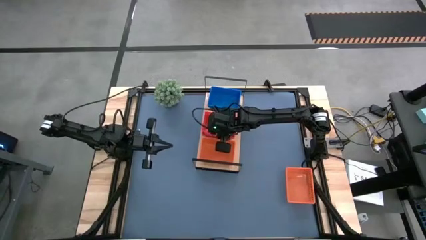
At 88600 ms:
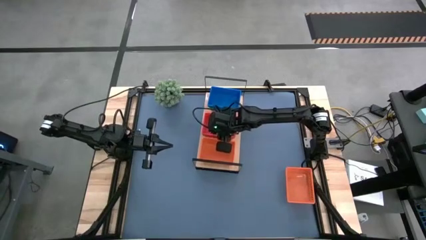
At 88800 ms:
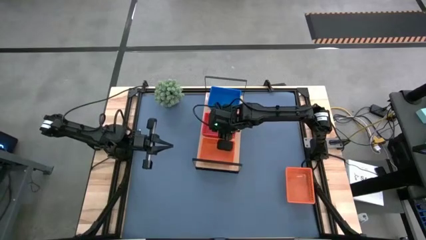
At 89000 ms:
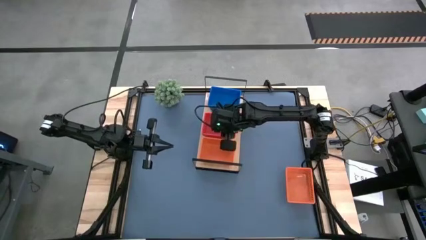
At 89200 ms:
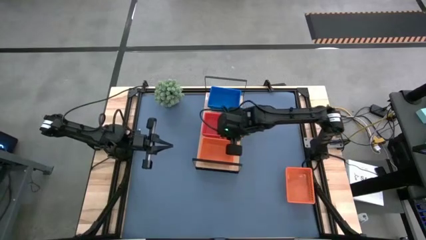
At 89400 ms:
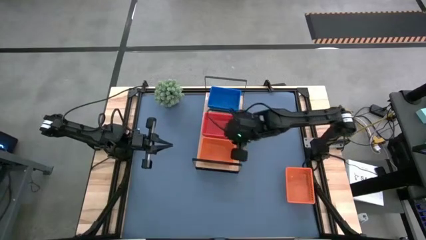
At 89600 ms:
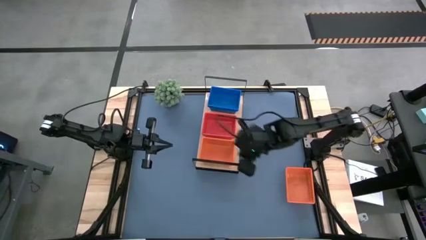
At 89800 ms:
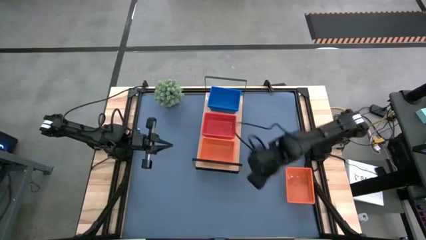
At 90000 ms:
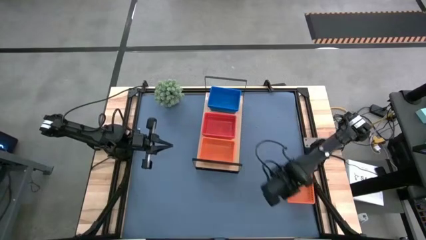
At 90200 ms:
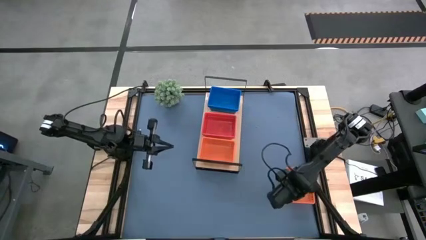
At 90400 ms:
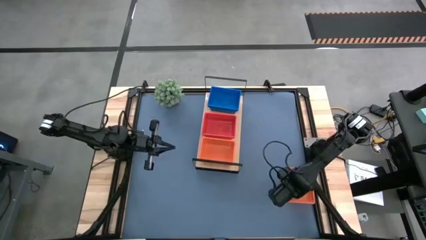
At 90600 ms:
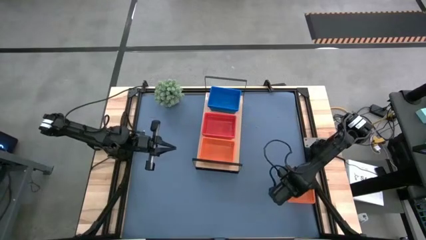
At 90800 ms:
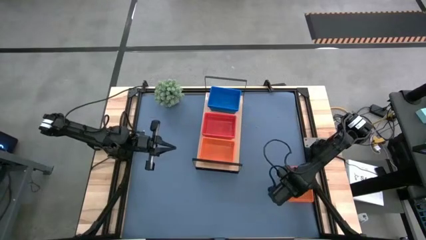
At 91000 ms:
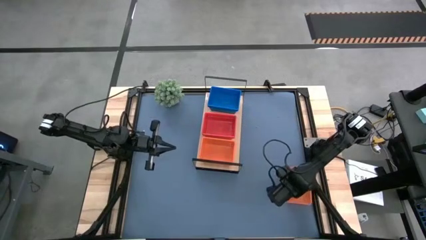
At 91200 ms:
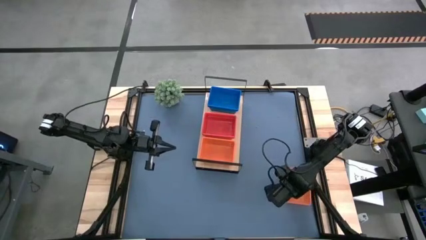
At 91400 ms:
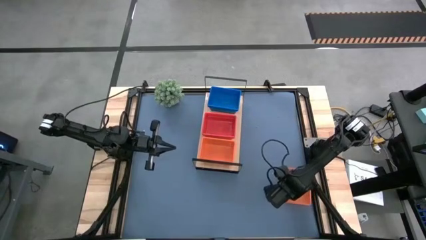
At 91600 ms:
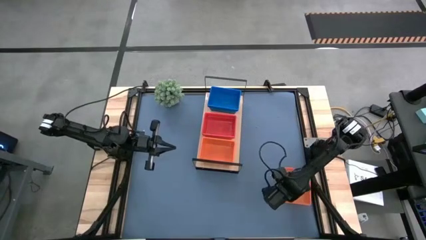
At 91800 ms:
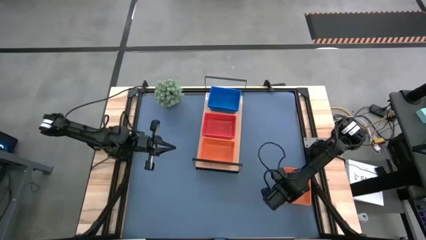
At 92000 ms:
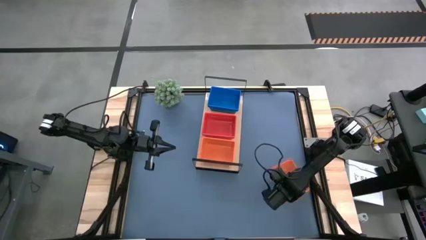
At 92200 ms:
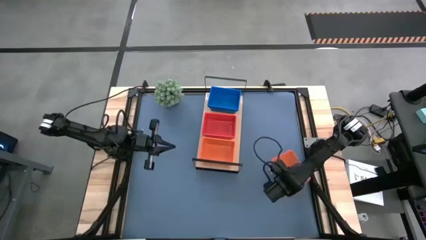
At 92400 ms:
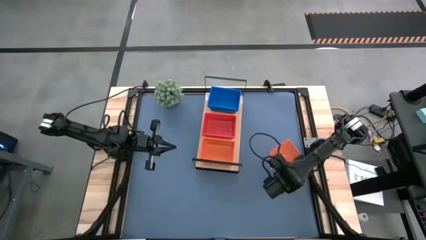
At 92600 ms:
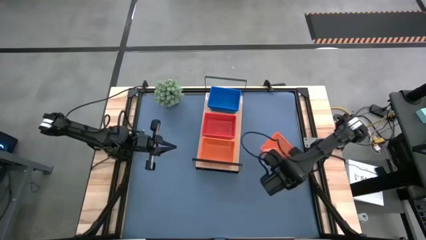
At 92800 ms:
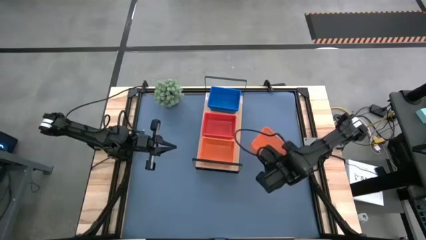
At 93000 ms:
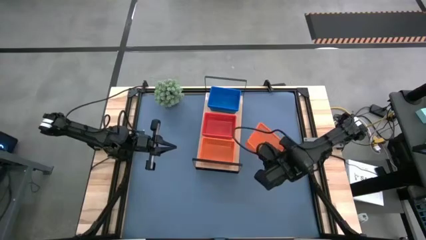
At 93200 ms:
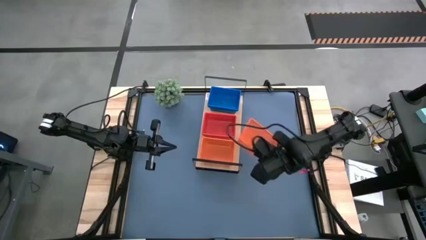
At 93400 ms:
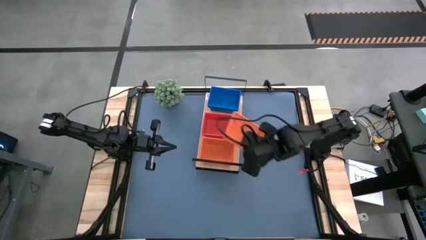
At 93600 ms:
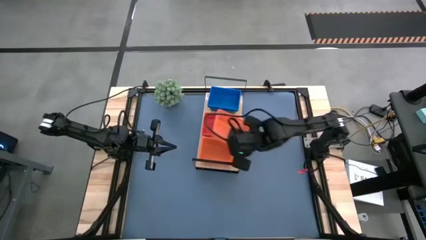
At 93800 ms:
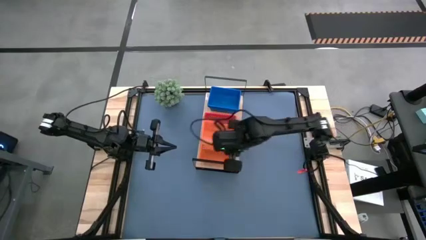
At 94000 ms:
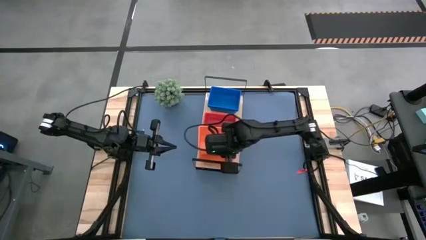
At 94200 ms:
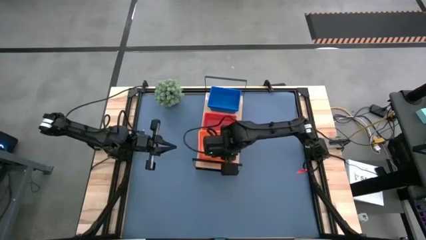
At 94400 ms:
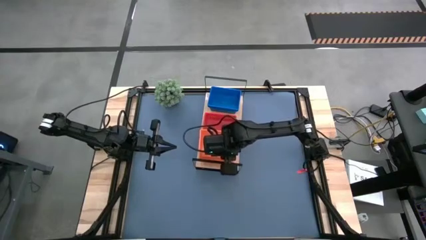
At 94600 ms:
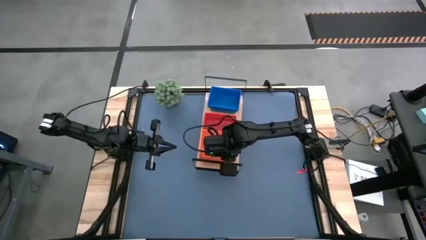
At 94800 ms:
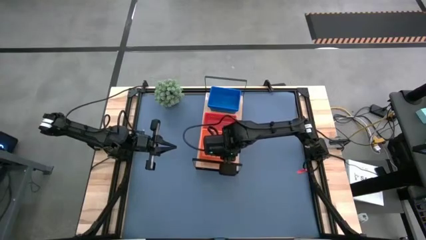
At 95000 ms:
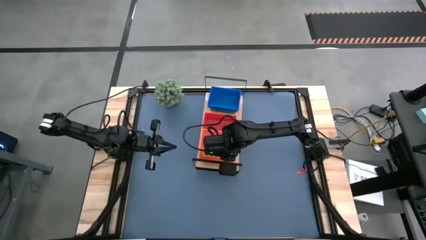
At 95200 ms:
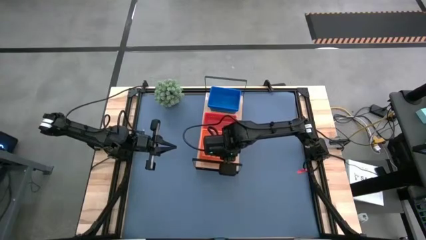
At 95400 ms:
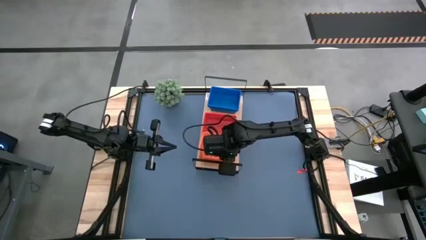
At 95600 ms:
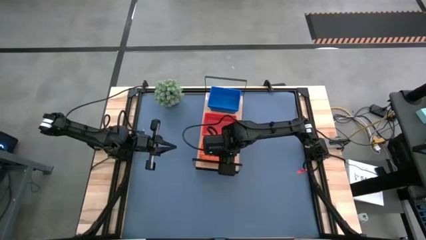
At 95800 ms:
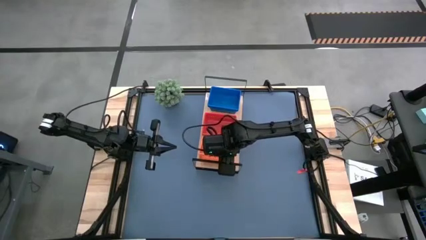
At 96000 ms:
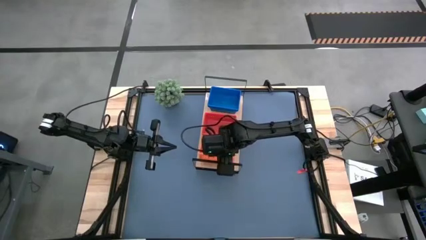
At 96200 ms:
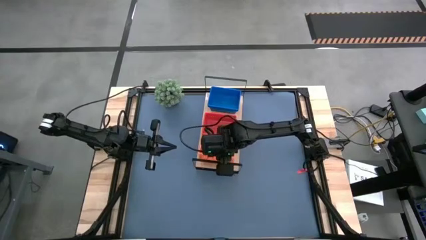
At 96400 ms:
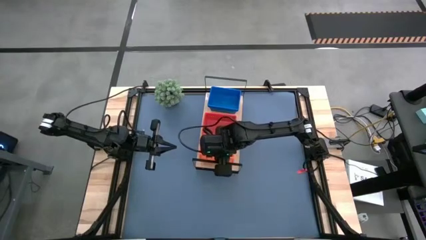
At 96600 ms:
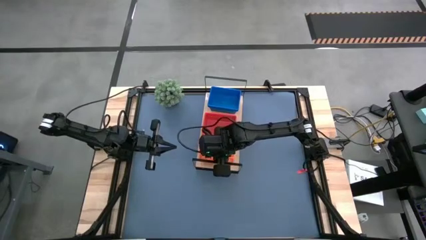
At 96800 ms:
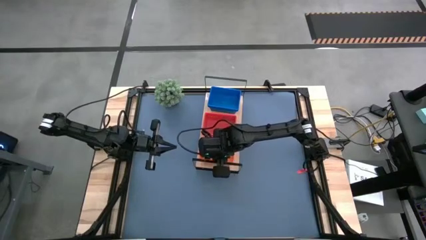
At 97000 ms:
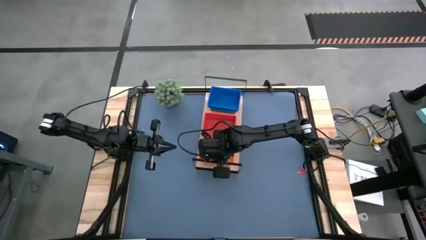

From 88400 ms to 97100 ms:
Task: Stack baskets on shelf by color
Stack the orange bin on top of the orange bin

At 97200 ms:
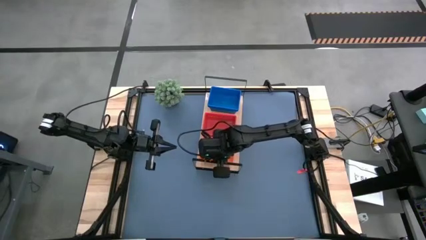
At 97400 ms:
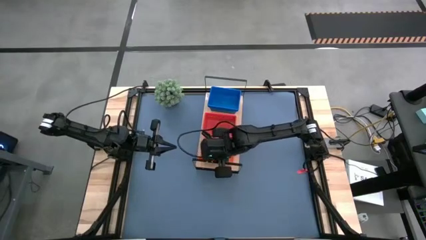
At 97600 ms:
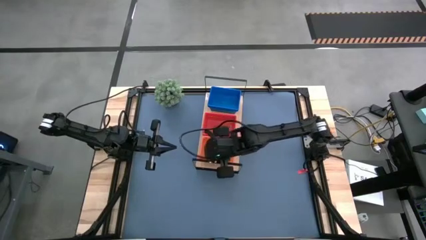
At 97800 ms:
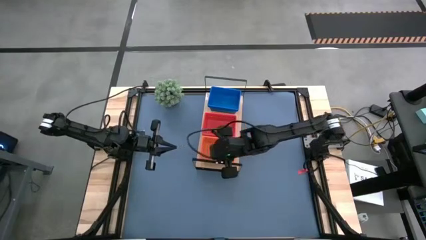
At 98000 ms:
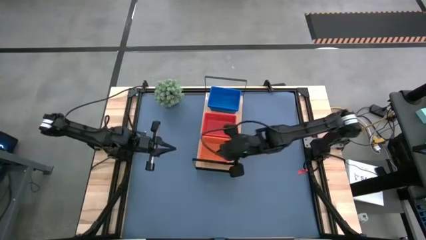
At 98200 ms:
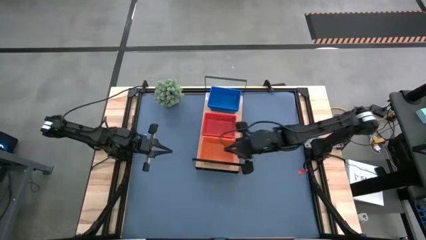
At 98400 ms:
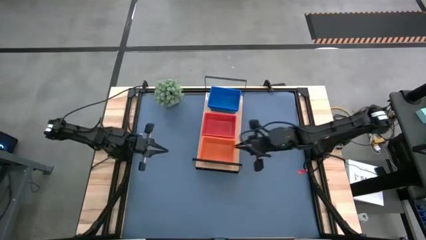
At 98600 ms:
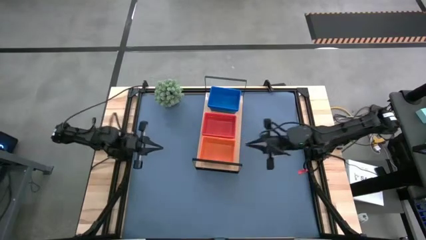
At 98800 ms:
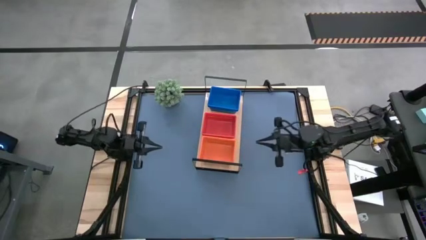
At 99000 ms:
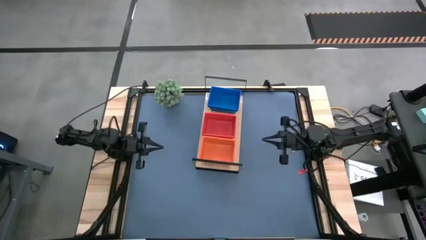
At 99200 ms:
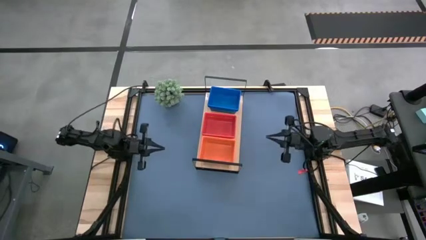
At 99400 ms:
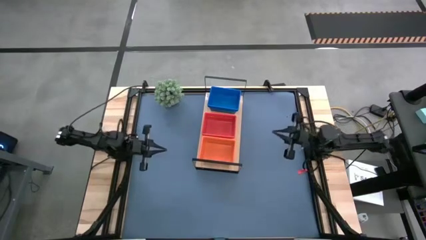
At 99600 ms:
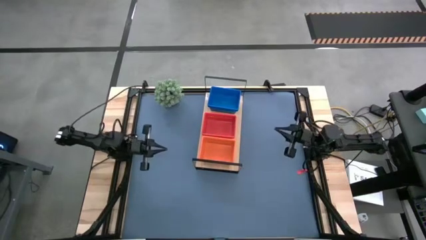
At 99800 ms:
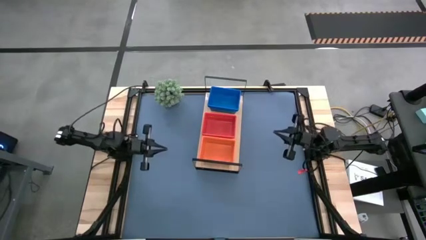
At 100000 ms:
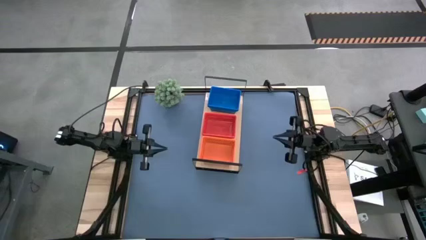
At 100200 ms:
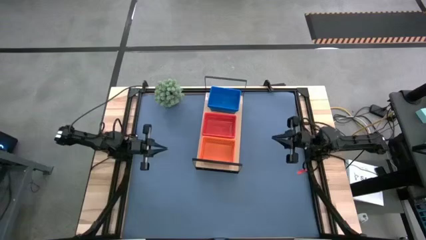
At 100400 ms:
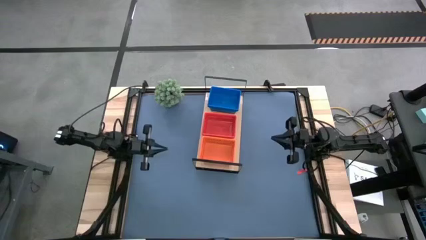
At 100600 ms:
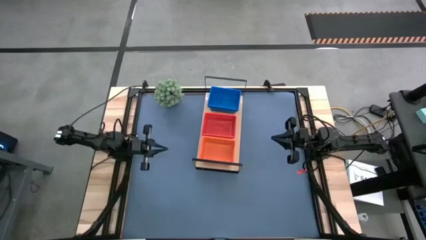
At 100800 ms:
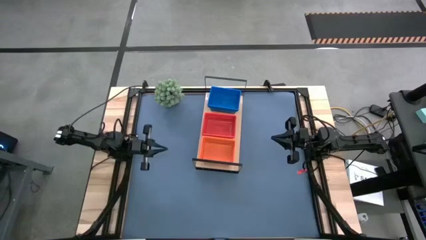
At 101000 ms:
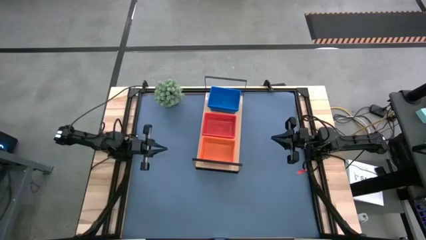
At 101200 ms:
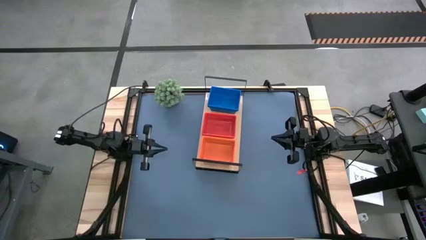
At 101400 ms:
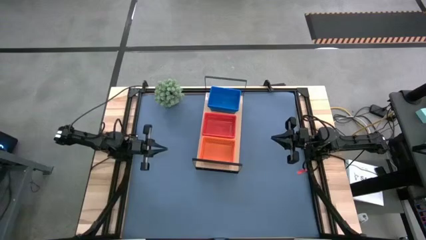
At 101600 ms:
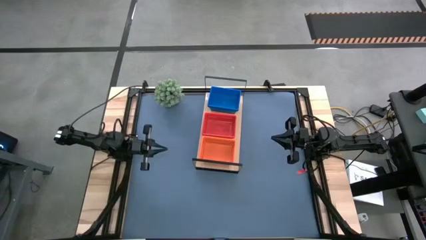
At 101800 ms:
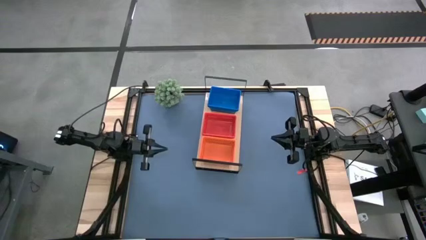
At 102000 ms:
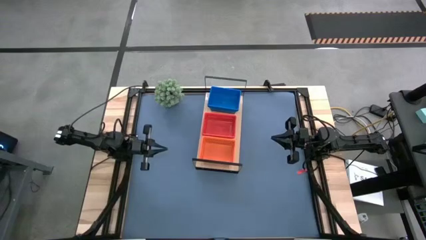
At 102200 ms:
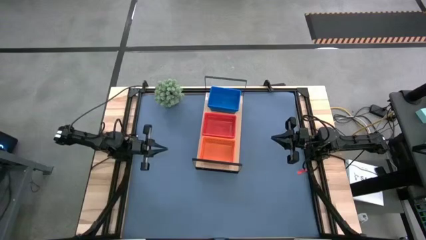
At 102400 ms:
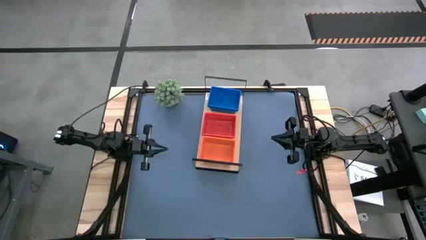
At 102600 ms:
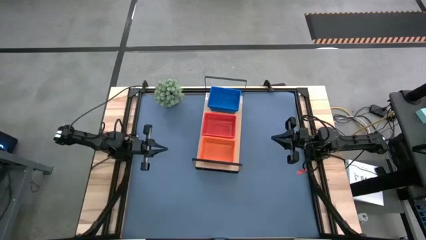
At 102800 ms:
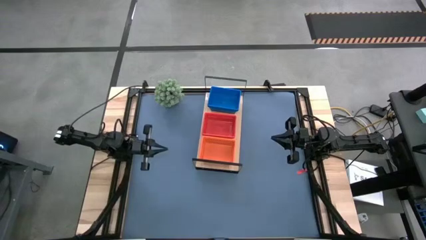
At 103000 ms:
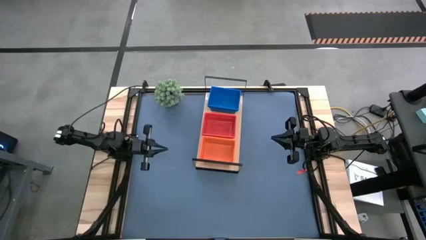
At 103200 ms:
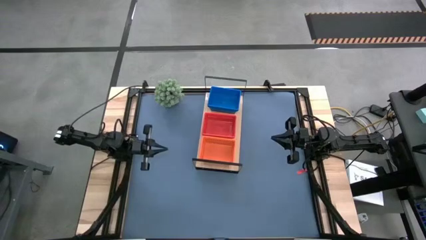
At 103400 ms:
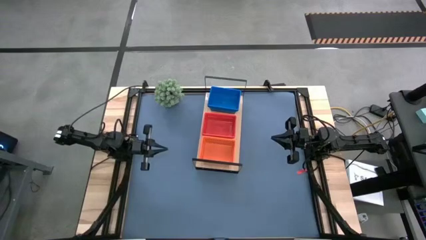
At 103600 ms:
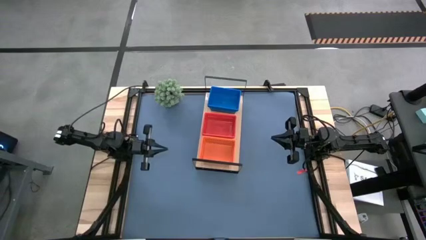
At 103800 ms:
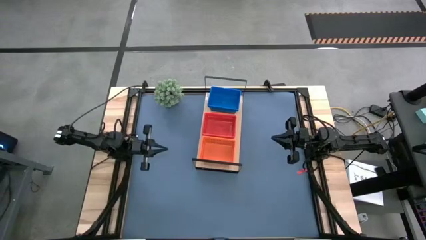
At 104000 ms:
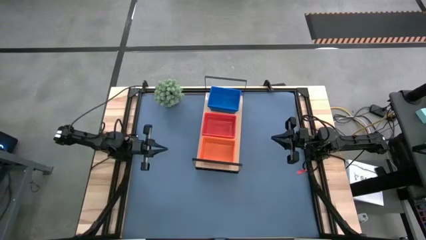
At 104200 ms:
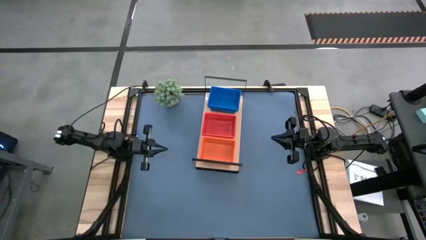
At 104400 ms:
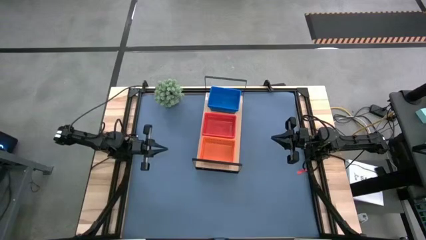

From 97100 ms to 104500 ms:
Return to Home Position
